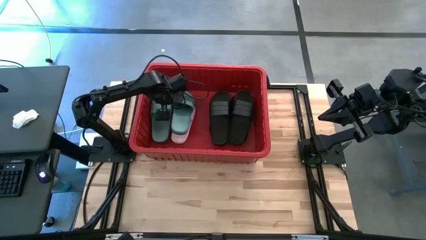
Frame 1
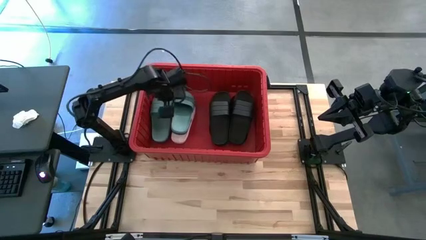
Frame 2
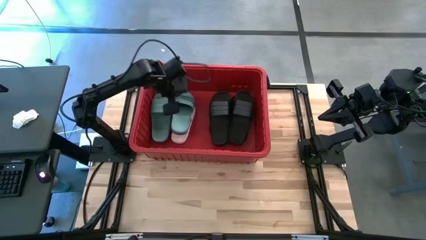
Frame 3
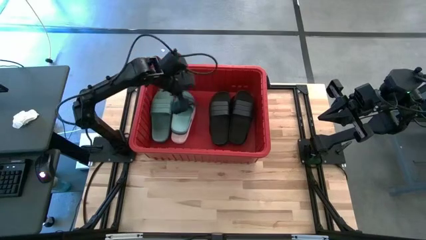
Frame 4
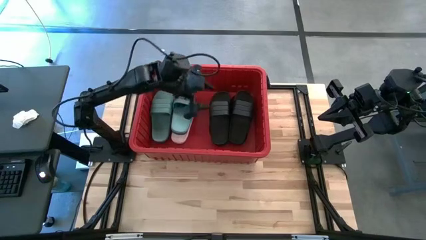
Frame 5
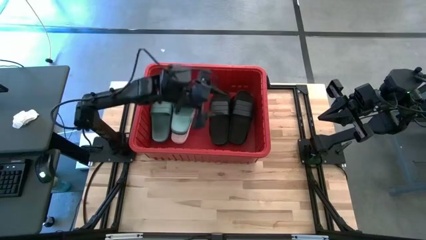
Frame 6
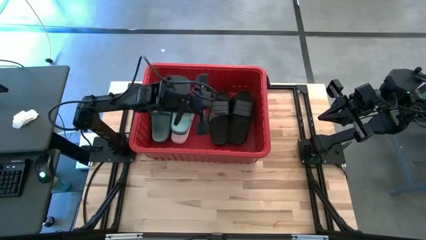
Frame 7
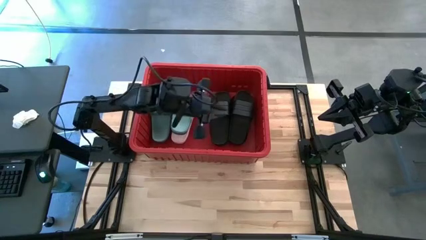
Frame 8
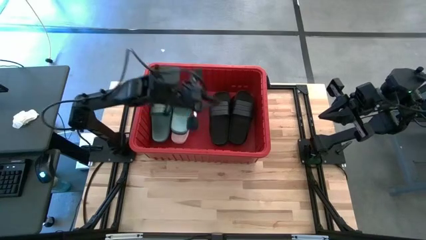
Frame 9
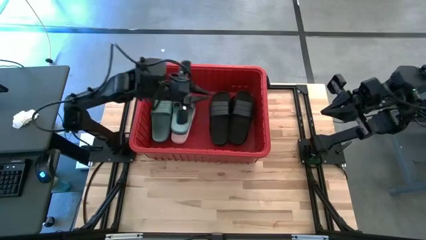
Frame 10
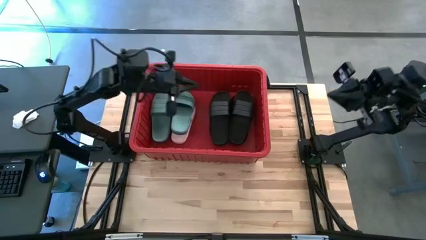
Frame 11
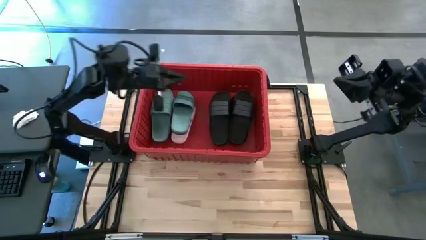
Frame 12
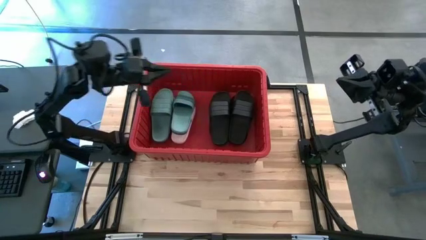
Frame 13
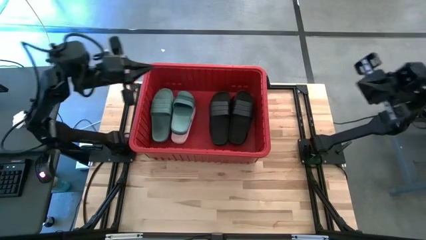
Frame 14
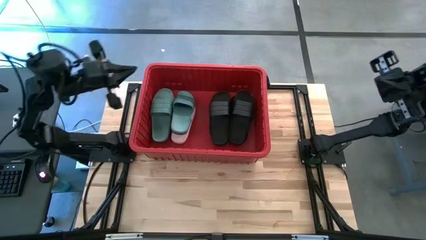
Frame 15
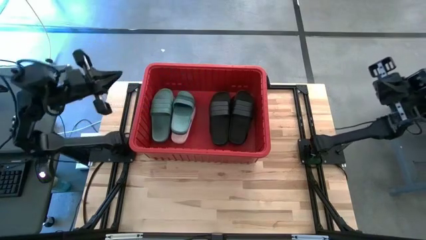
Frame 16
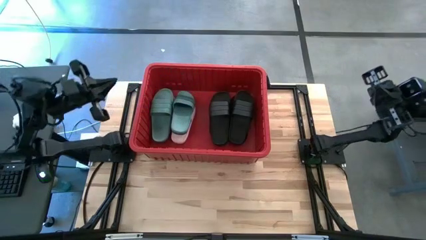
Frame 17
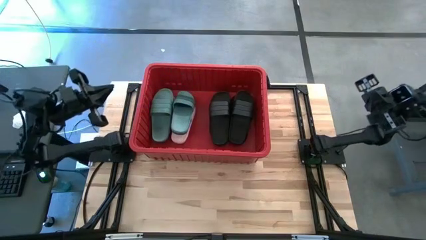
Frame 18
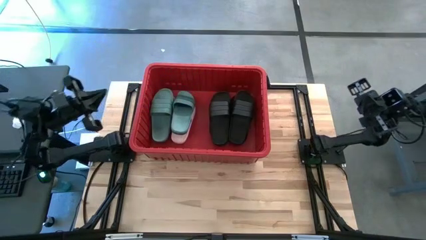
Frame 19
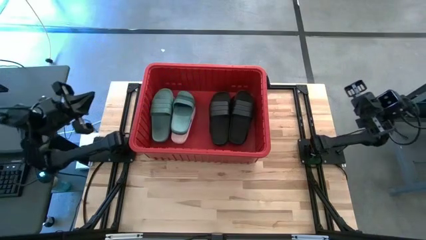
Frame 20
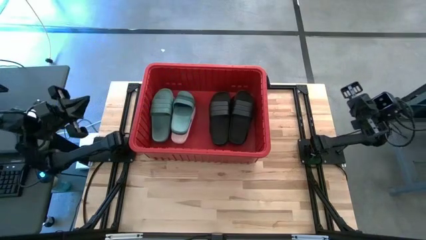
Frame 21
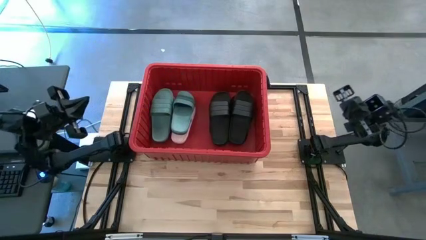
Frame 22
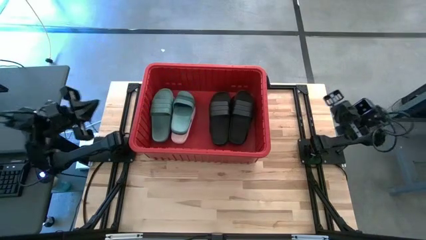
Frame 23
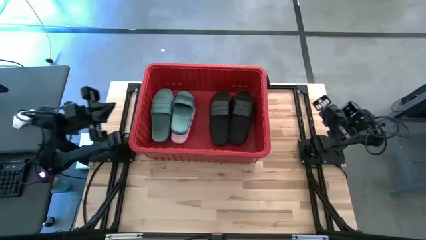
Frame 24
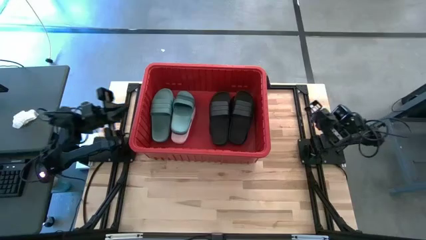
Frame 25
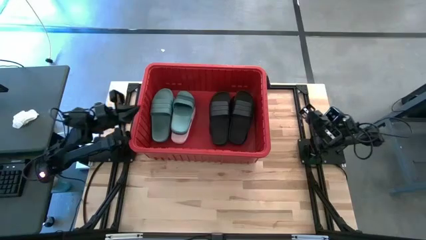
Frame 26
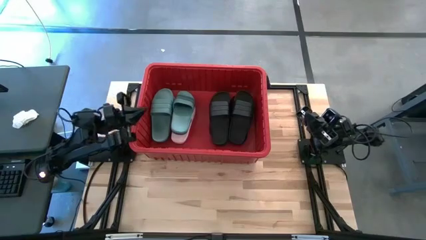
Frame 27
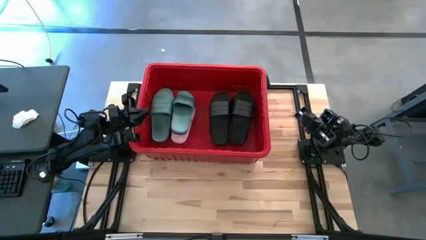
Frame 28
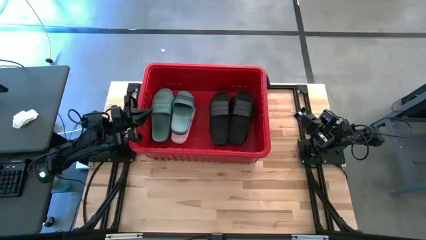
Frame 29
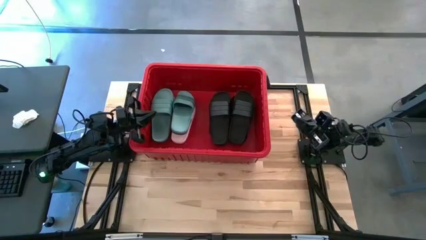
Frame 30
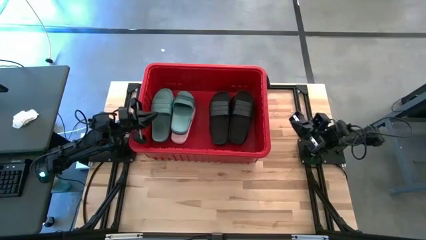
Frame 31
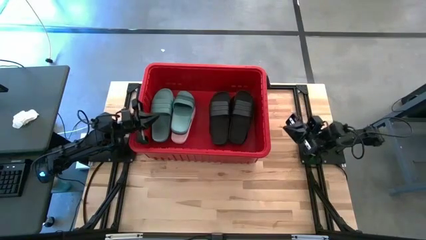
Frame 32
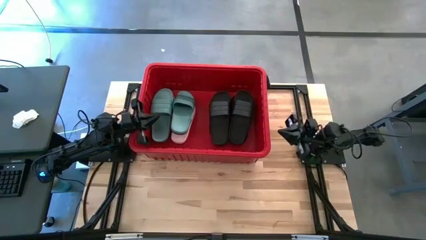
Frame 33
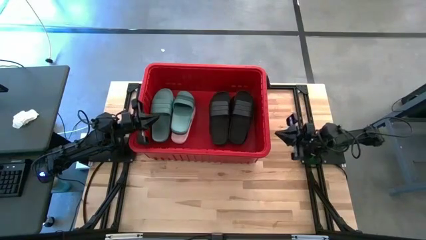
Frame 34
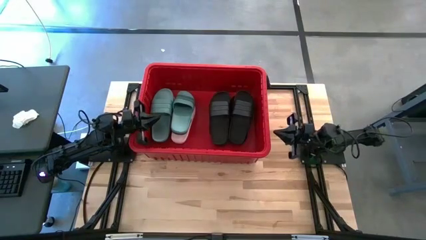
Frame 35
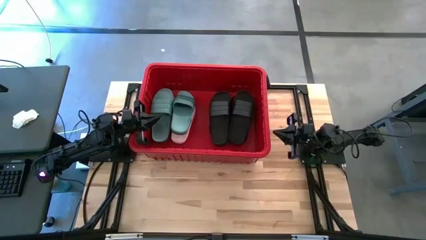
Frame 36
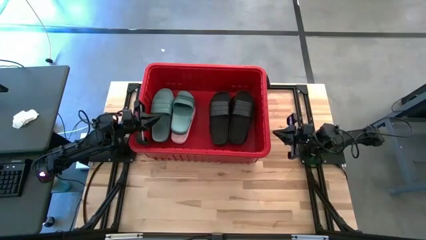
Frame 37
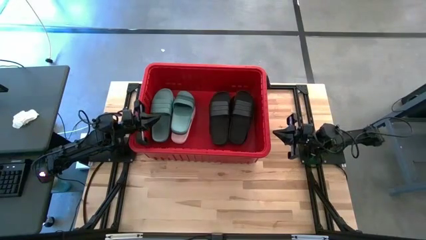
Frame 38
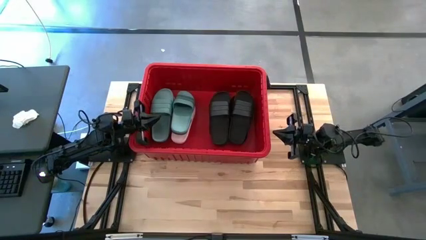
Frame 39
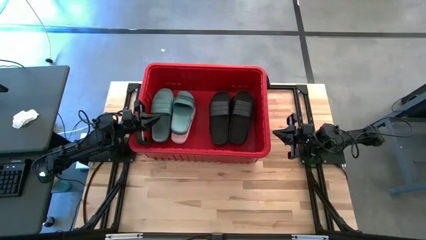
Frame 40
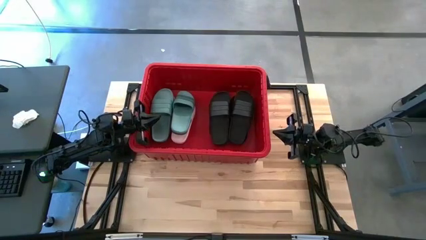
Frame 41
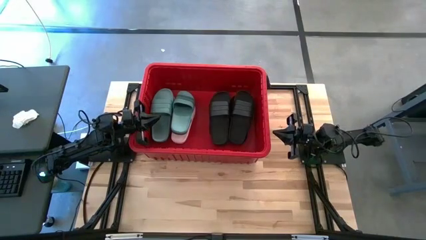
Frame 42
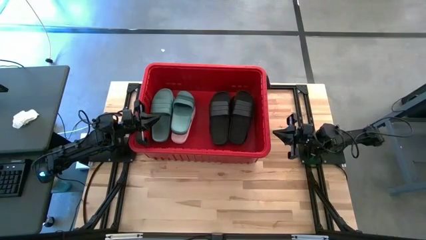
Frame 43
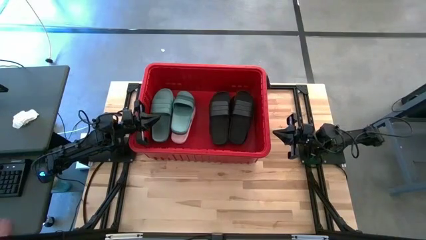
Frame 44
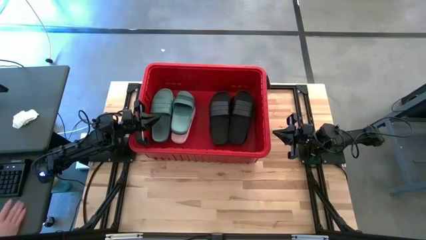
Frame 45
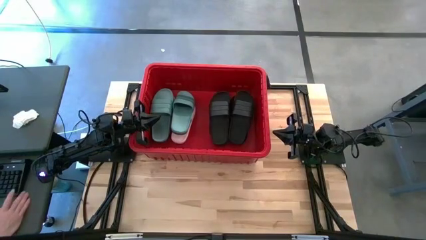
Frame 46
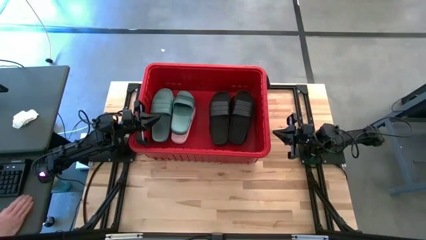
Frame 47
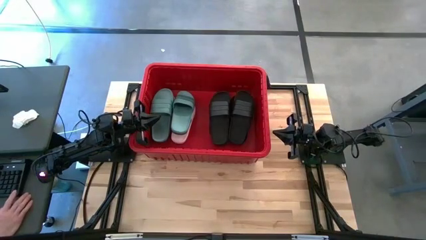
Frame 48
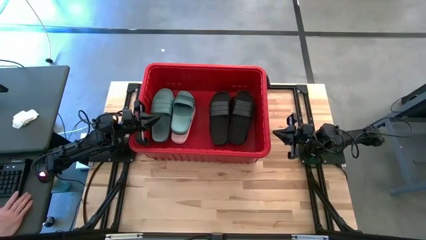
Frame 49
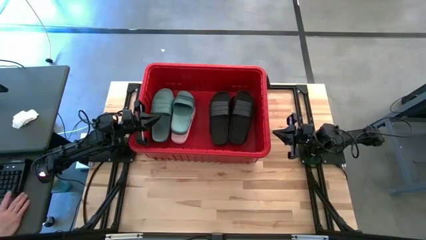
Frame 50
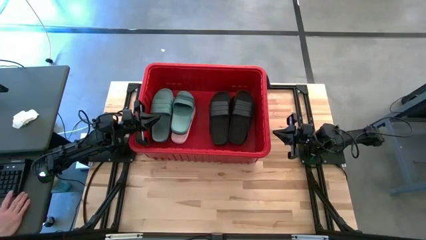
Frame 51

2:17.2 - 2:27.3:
Task: Pick and place slides into bin
Return to Home Position

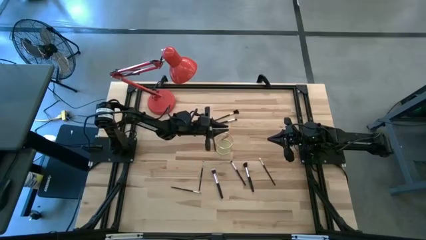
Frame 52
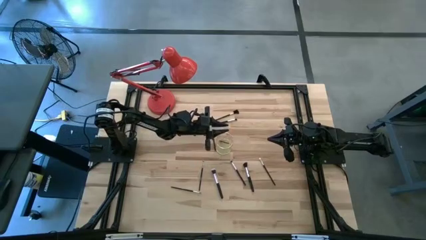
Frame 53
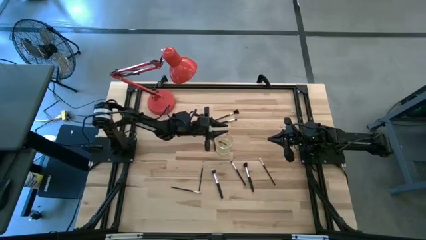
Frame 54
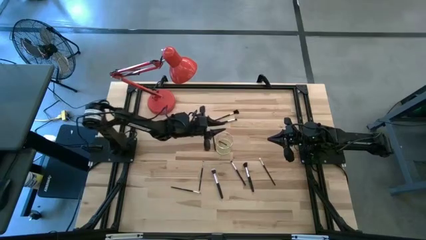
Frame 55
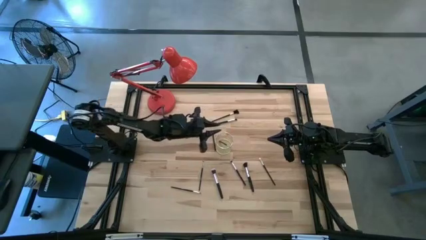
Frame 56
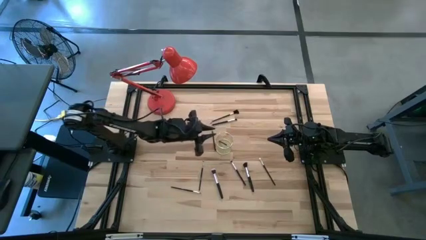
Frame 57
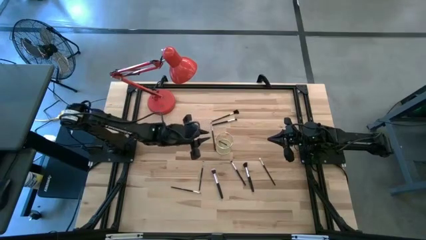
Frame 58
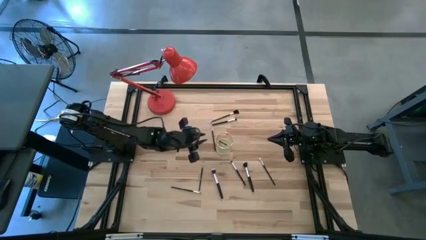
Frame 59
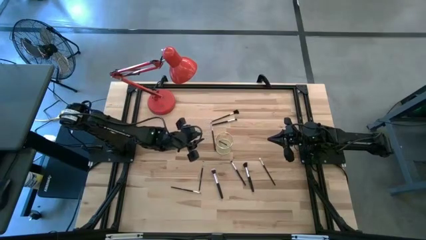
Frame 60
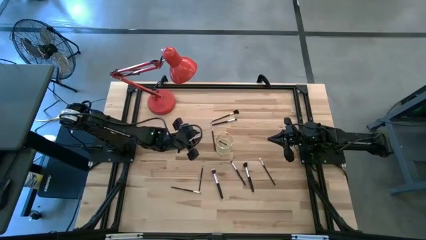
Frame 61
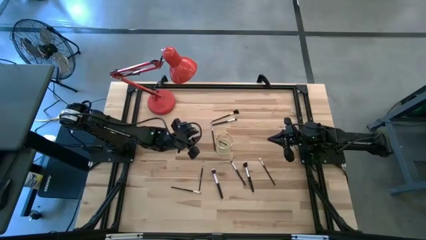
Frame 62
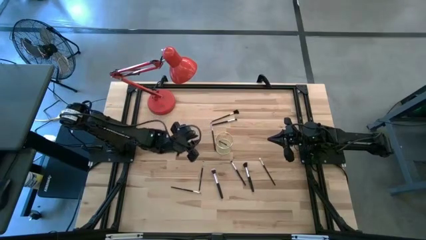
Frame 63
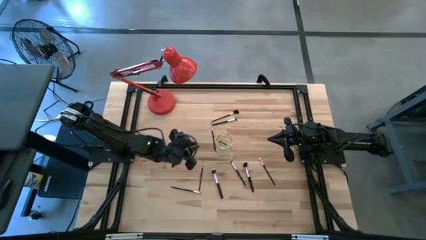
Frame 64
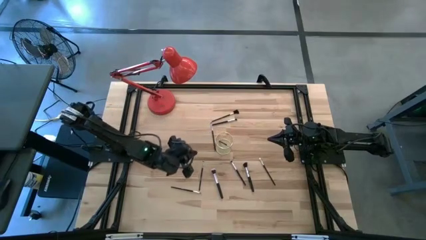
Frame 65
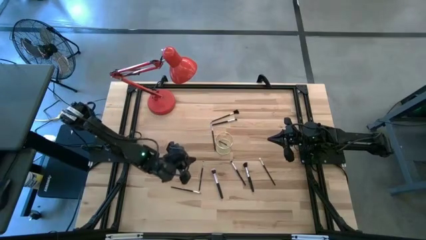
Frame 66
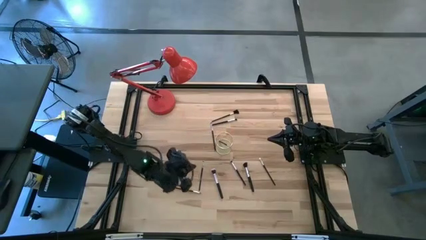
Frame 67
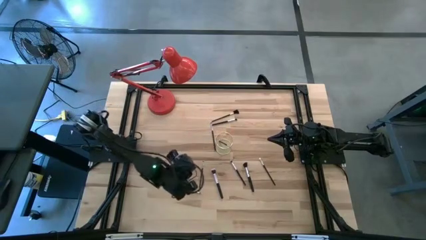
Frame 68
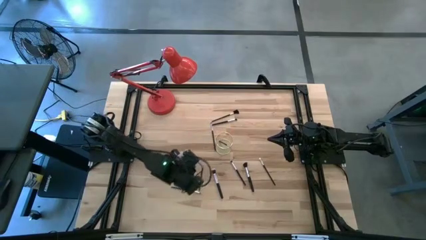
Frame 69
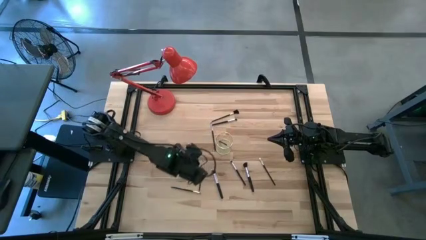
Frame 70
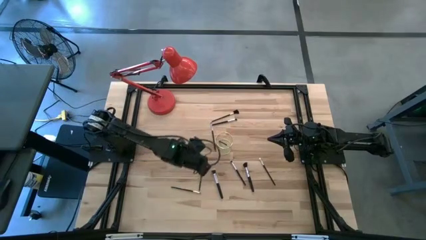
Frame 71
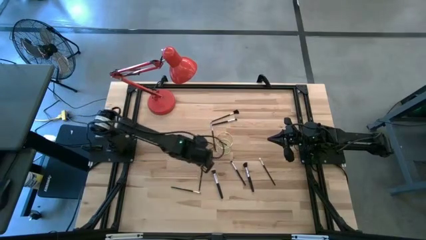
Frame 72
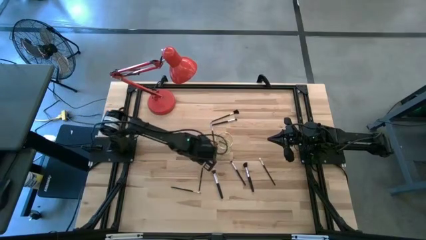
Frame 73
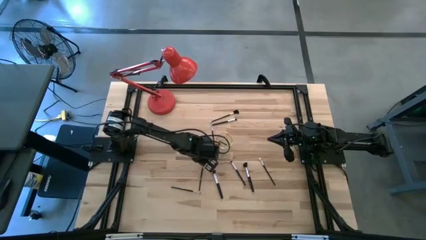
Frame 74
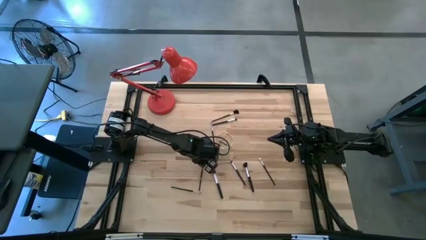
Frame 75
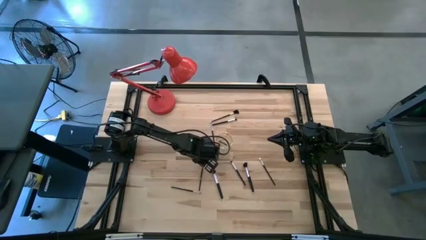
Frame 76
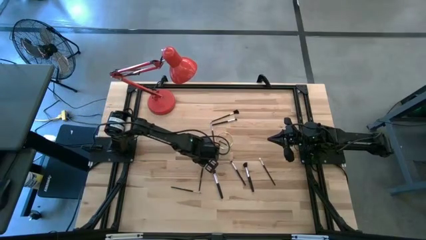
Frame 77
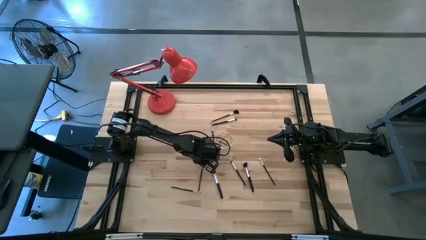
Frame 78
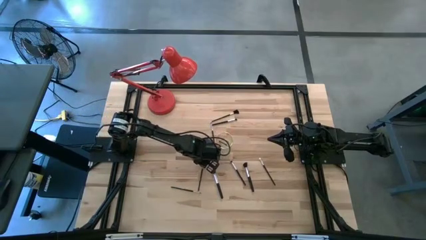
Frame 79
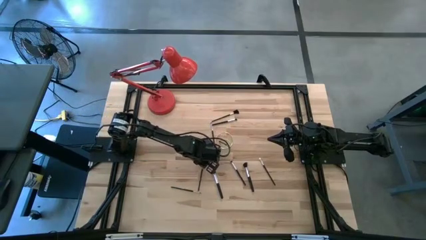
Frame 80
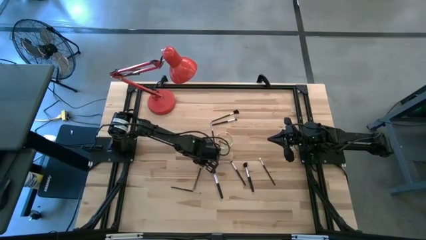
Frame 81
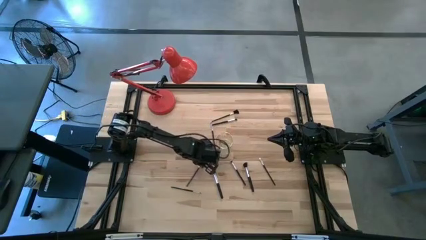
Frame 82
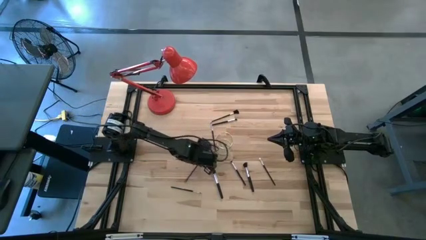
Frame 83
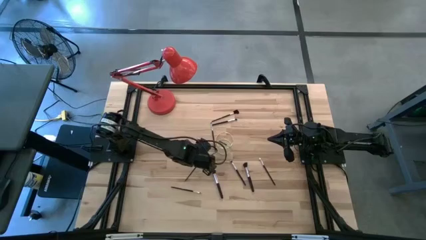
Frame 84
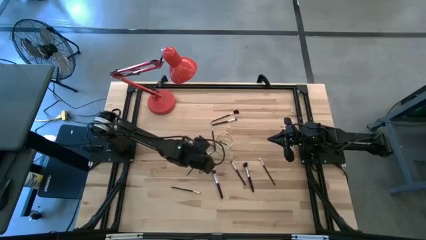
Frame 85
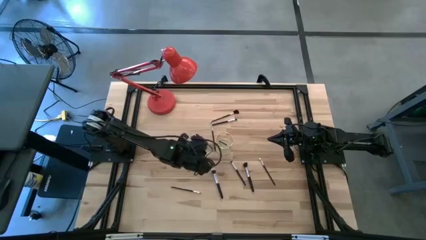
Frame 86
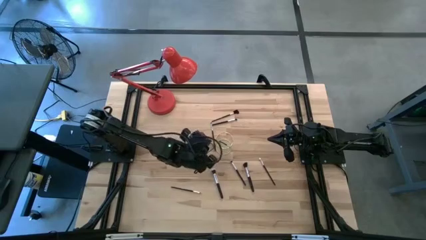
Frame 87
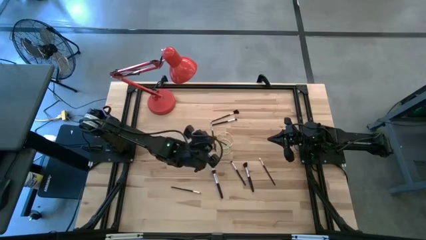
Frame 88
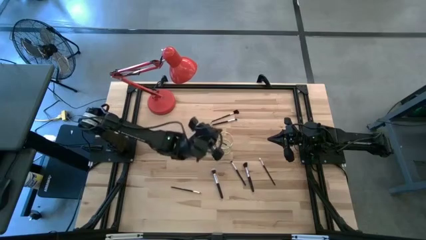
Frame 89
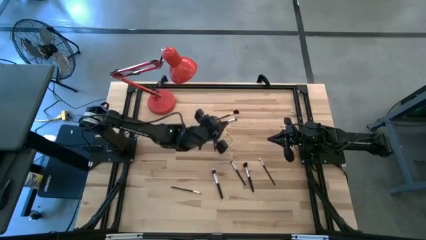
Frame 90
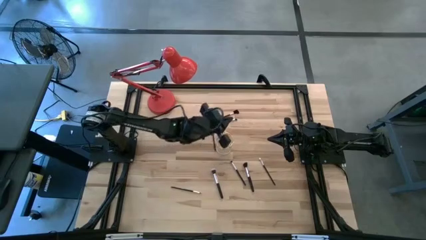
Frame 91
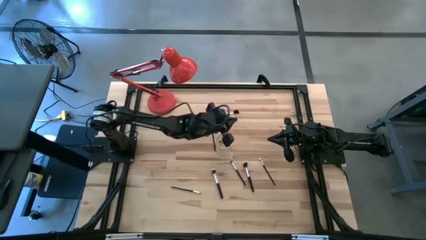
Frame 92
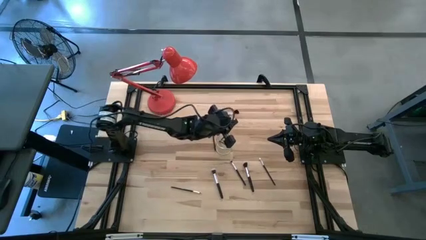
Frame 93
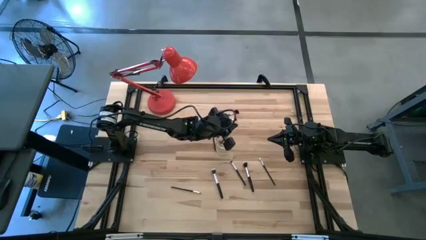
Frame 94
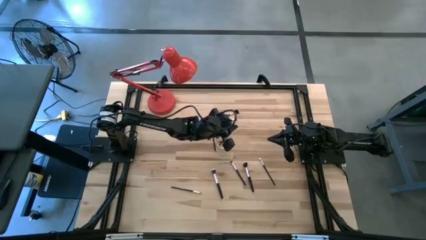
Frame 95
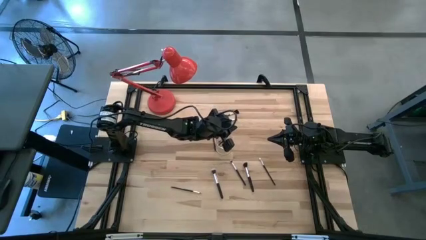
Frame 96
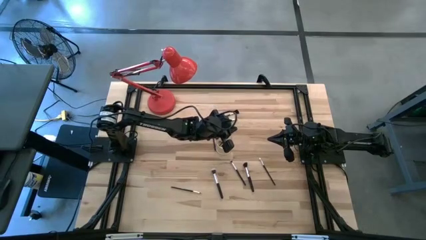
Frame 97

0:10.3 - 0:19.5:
Task: Put items in baskets/containers
Put the eyeshadow brush into the wire organizer
